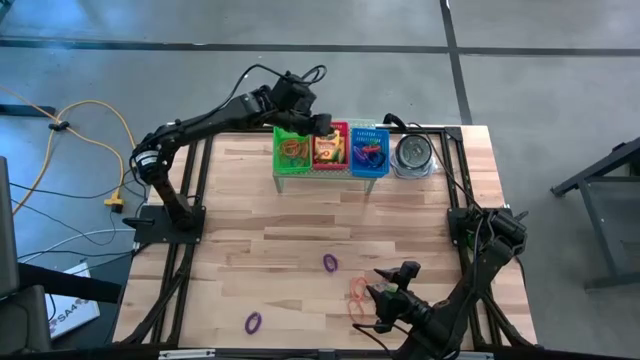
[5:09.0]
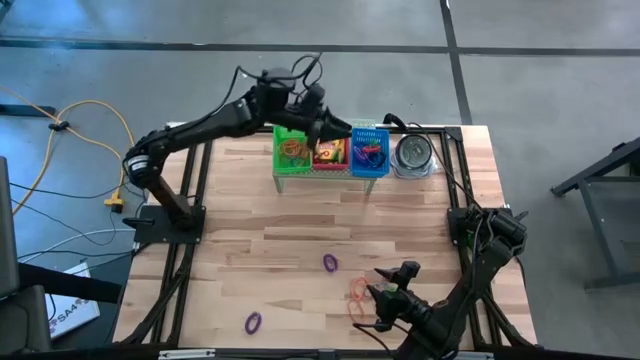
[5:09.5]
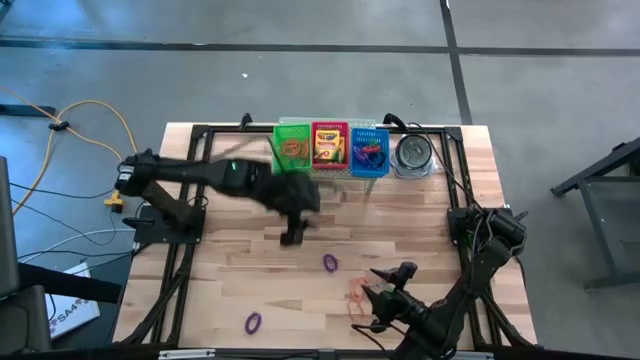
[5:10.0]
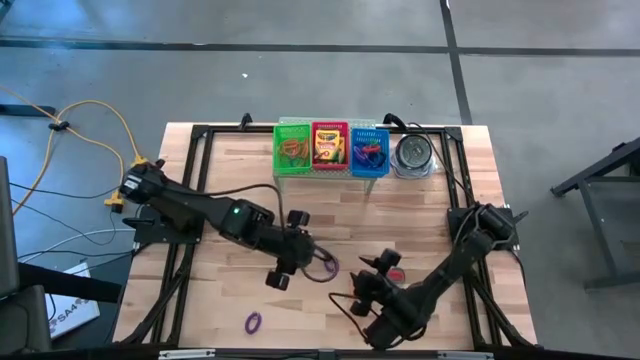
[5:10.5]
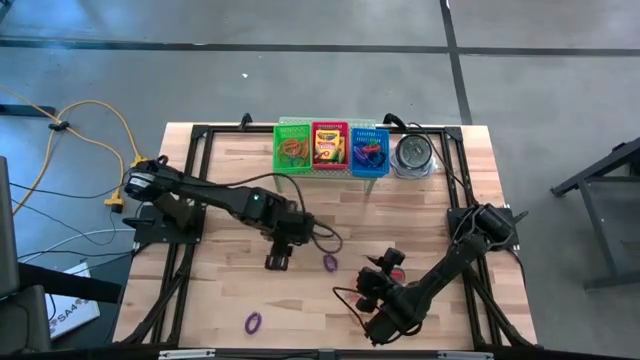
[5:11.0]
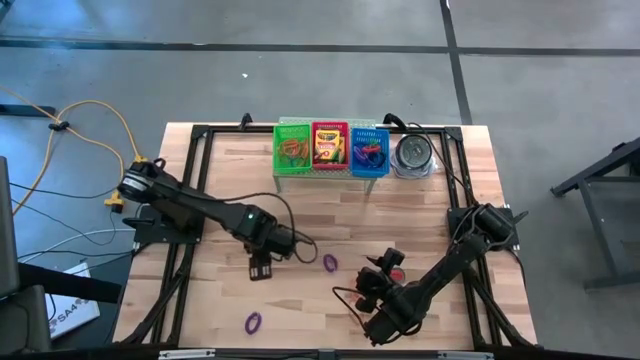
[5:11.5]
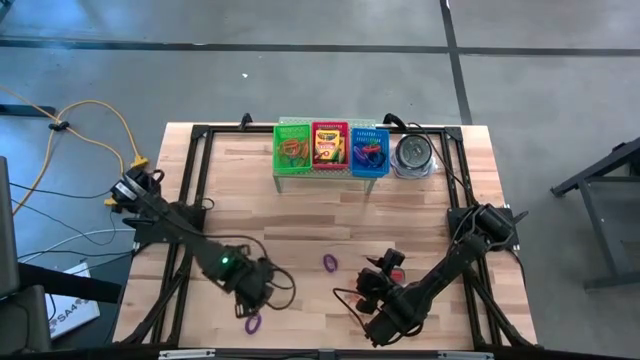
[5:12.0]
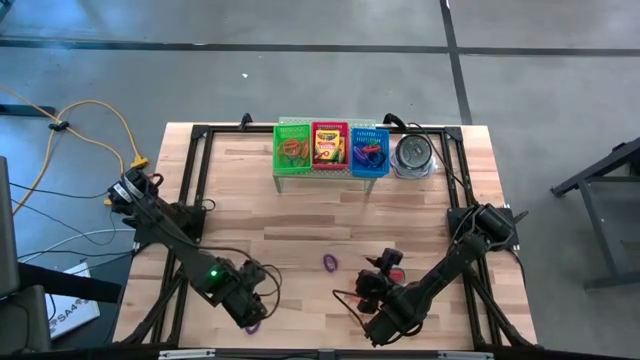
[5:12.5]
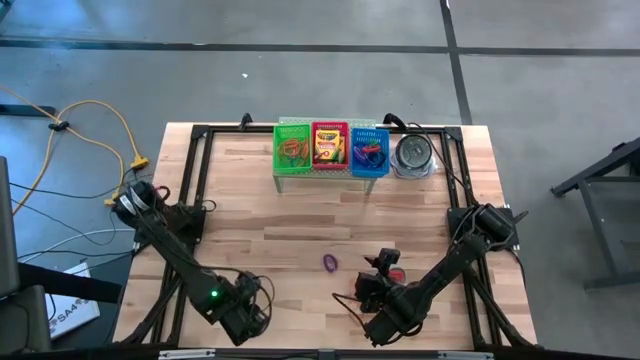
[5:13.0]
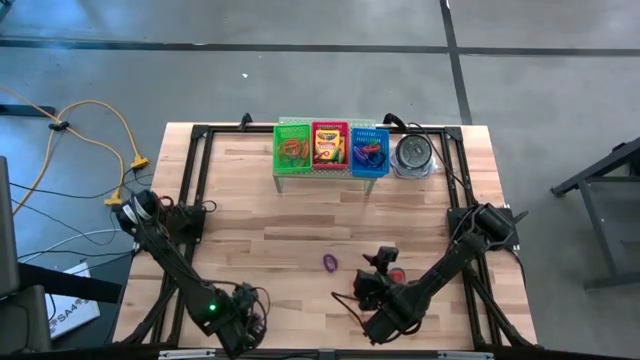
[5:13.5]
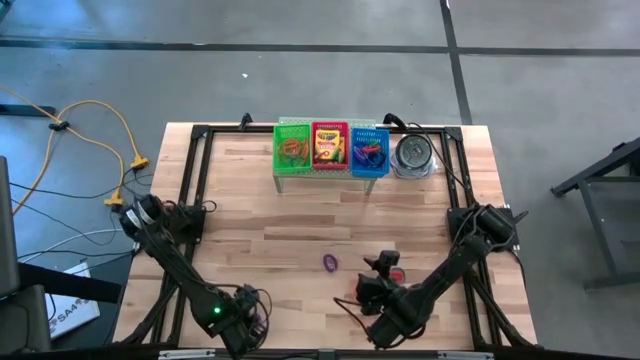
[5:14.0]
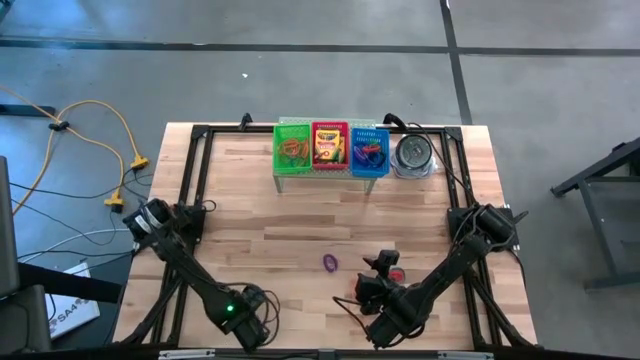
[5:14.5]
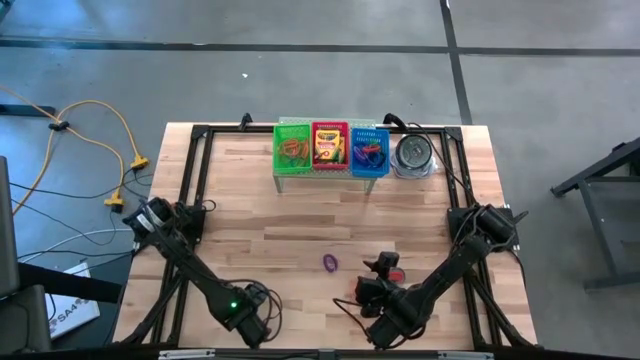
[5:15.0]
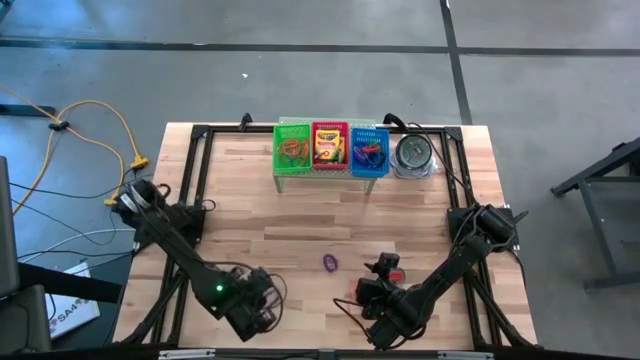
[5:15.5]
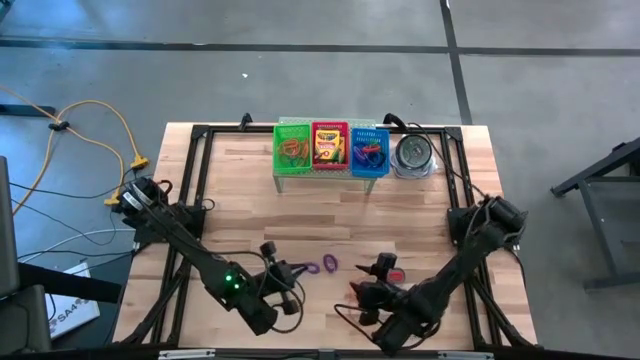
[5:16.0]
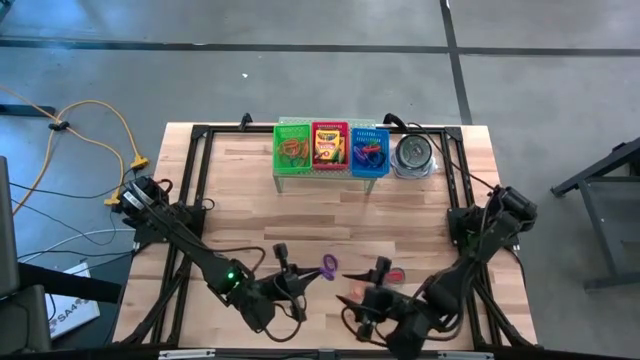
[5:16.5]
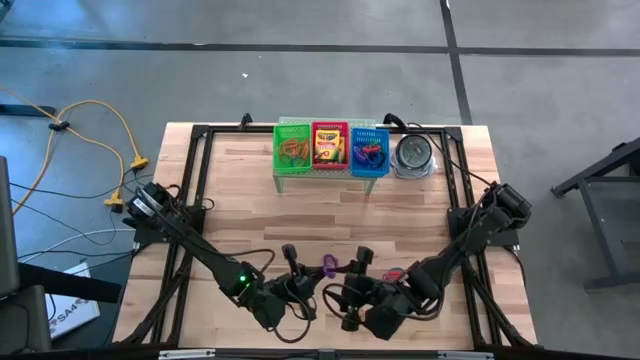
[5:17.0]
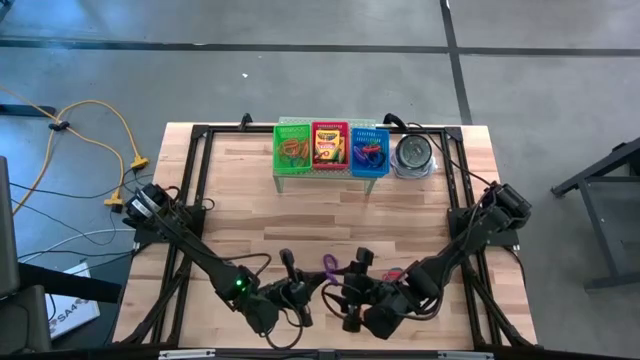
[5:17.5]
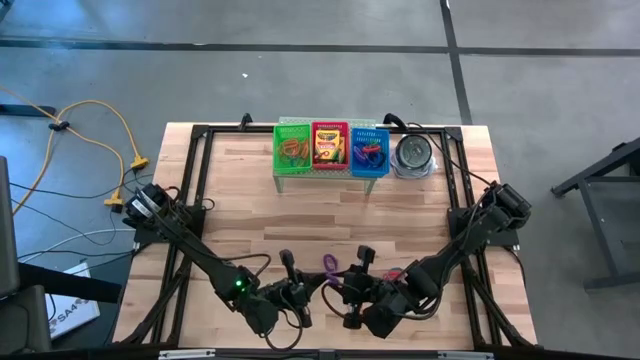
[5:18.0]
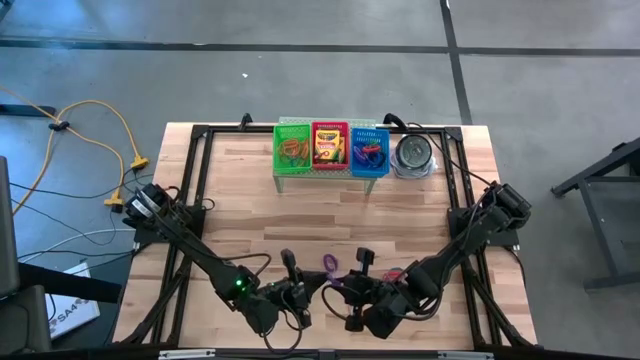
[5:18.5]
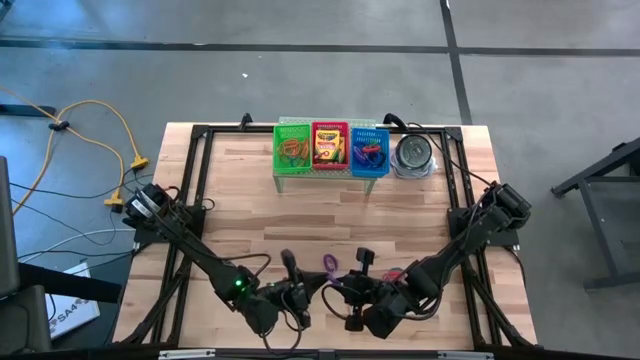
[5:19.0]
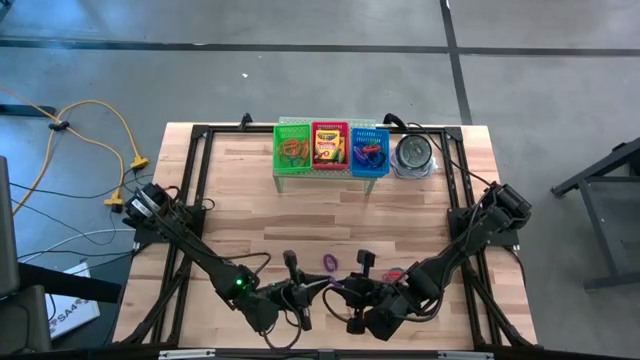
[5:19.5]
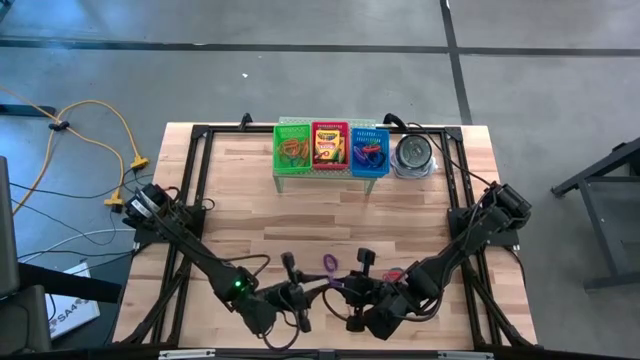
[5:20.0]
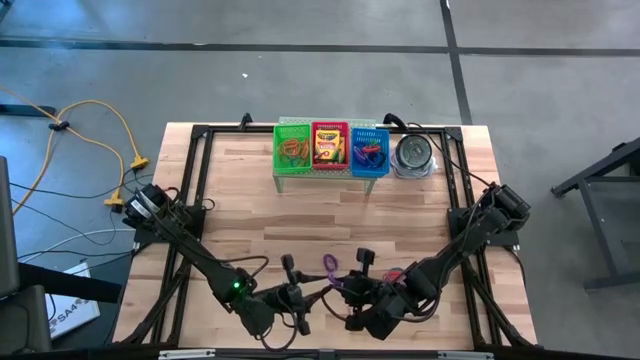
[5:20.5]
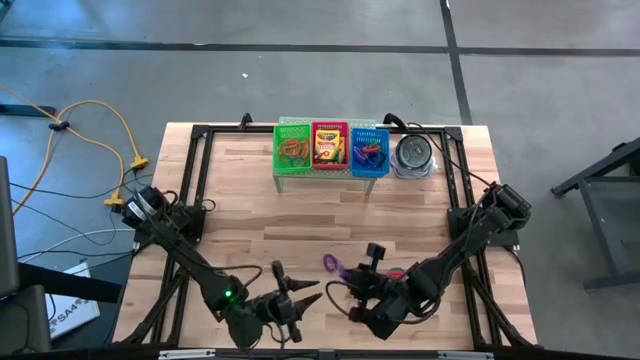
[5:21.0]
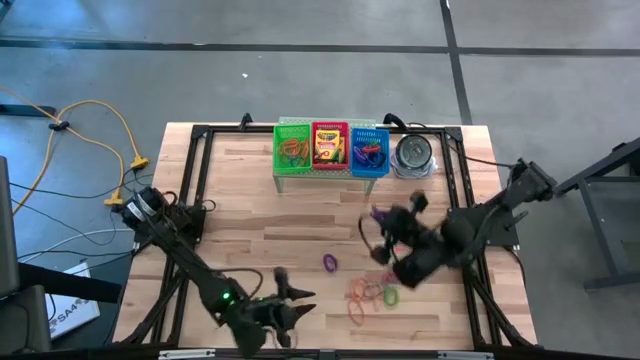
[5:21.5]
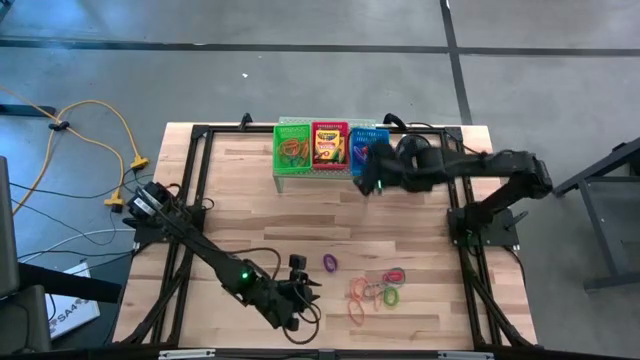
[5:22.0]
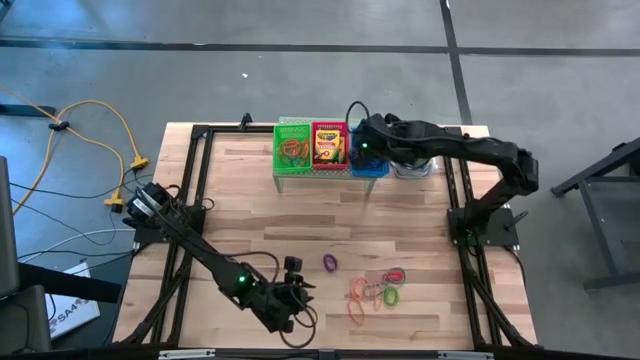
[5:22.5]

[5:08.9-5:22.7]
Task: Pick & Place Office Desk Supplies
Put the bottom violet spring keychain into the blue bin on the shelf
